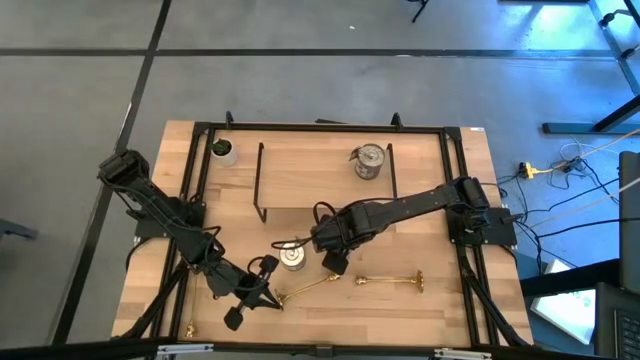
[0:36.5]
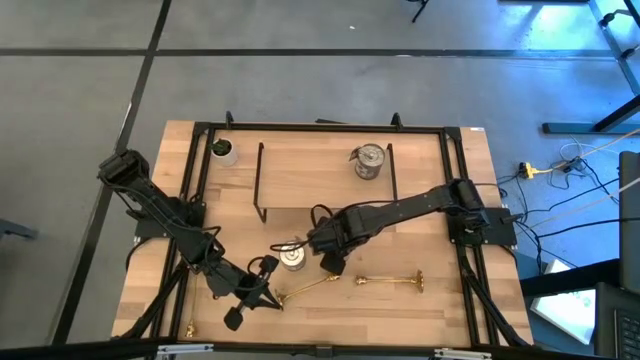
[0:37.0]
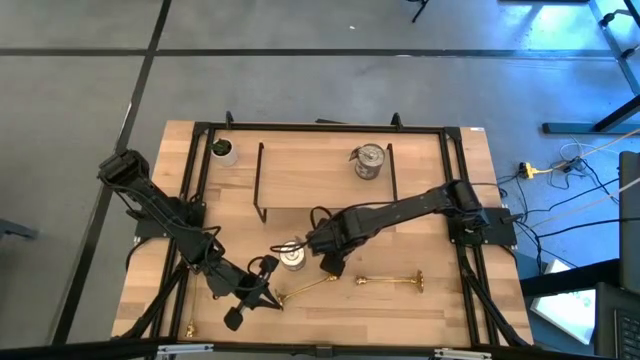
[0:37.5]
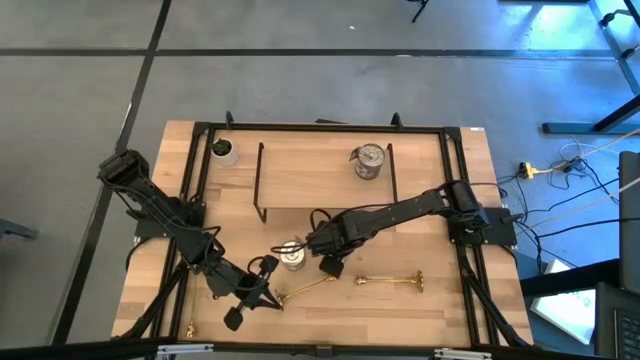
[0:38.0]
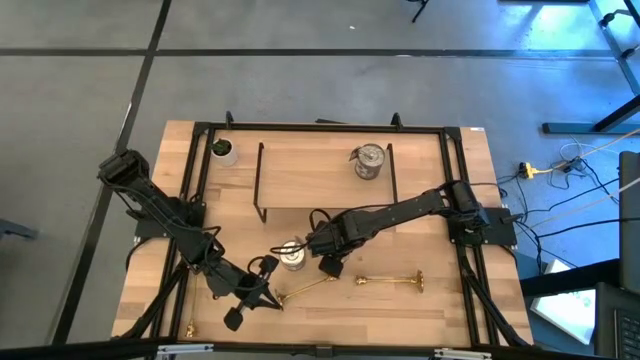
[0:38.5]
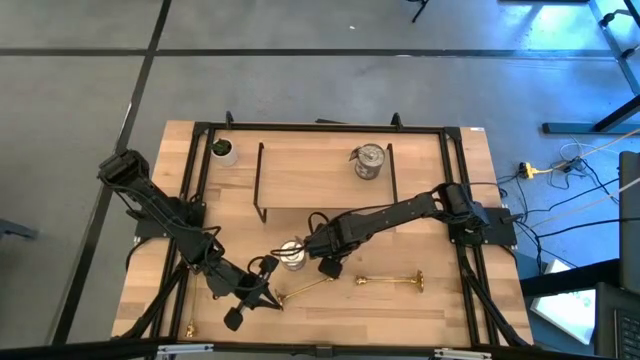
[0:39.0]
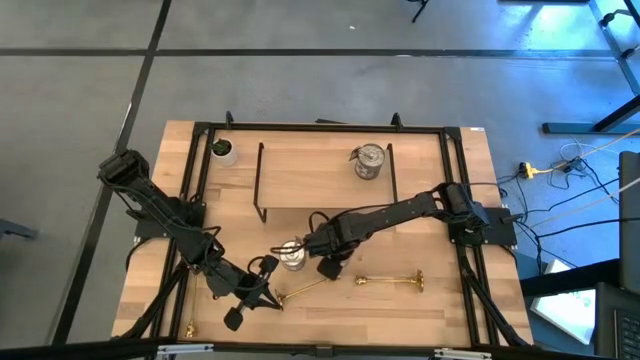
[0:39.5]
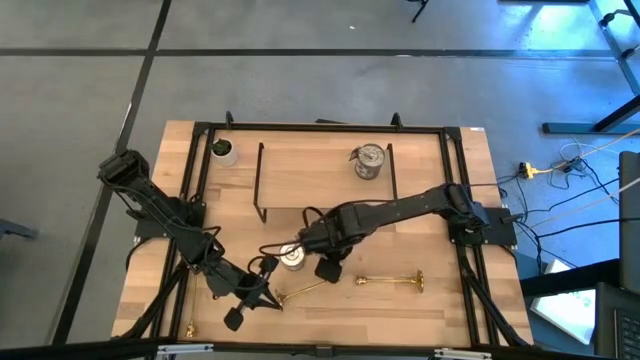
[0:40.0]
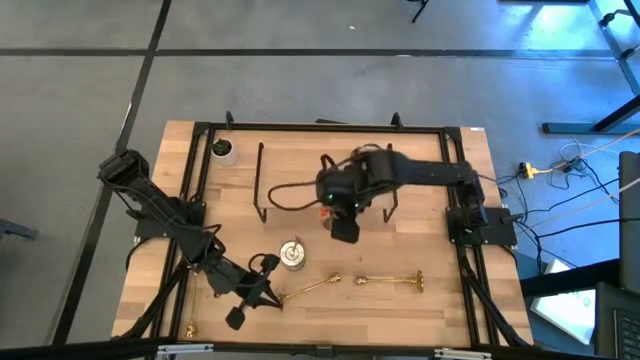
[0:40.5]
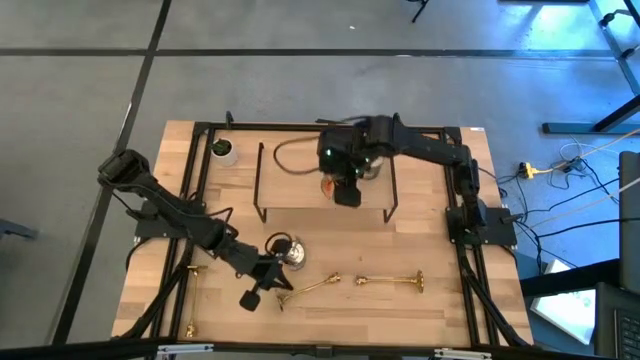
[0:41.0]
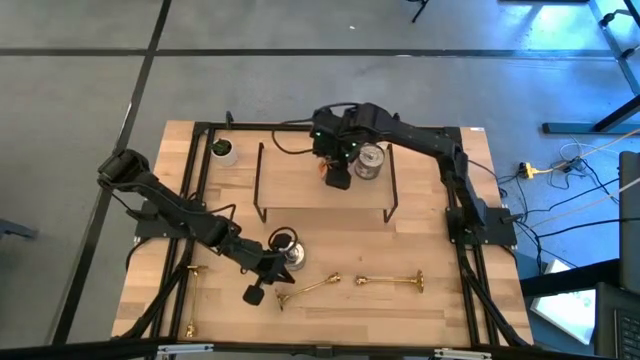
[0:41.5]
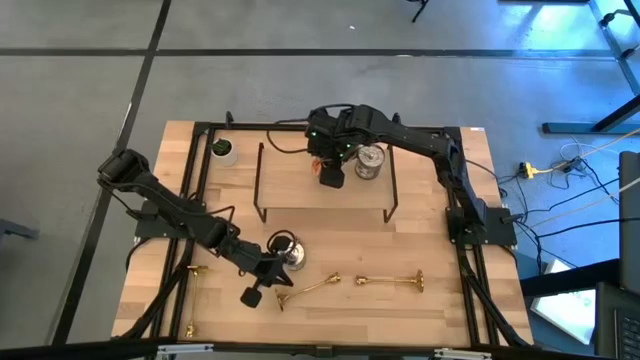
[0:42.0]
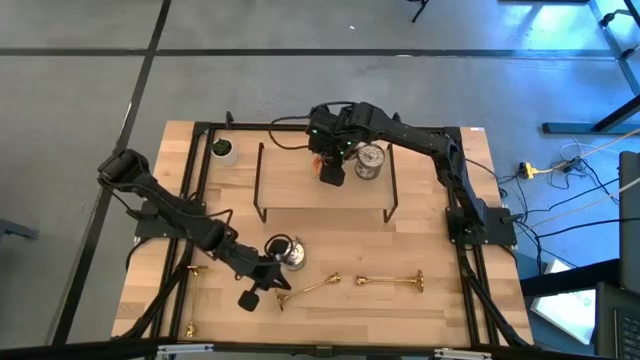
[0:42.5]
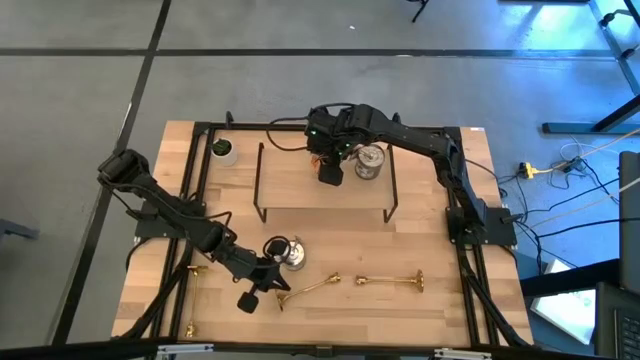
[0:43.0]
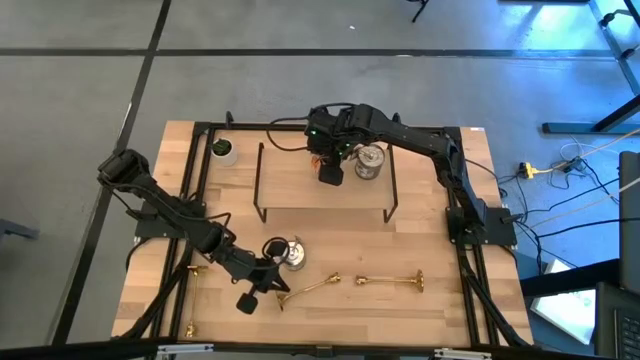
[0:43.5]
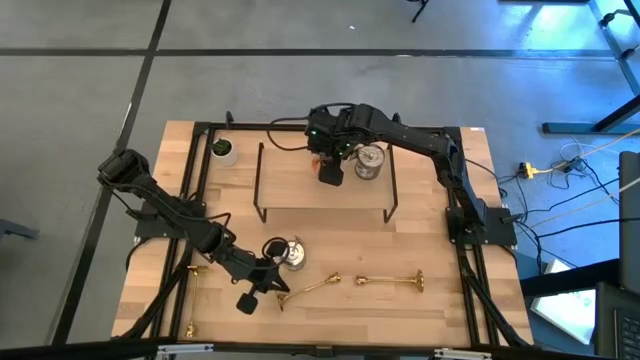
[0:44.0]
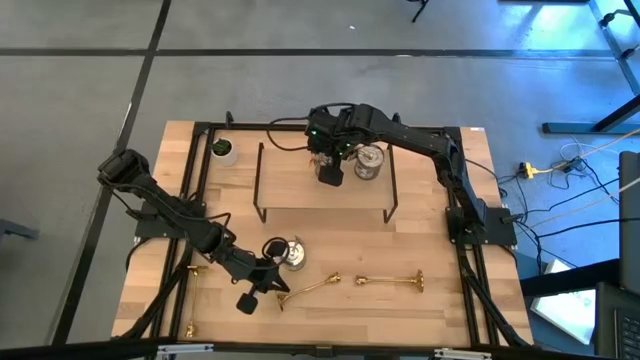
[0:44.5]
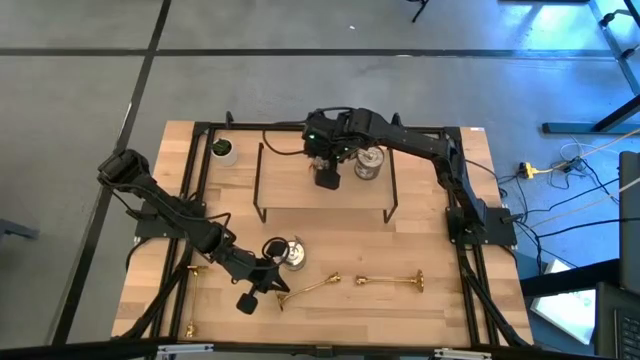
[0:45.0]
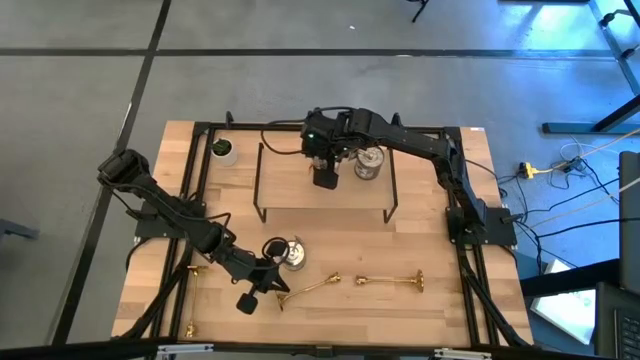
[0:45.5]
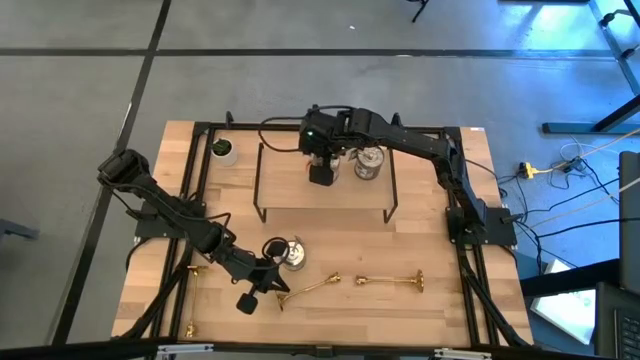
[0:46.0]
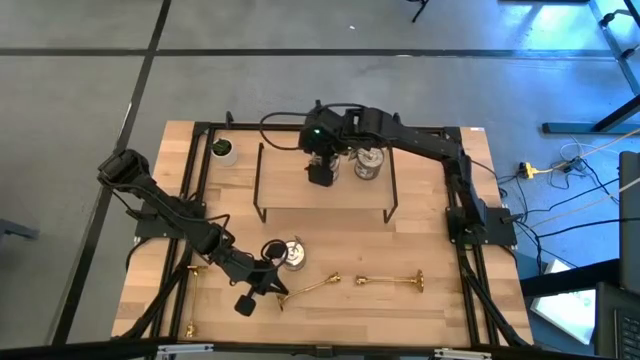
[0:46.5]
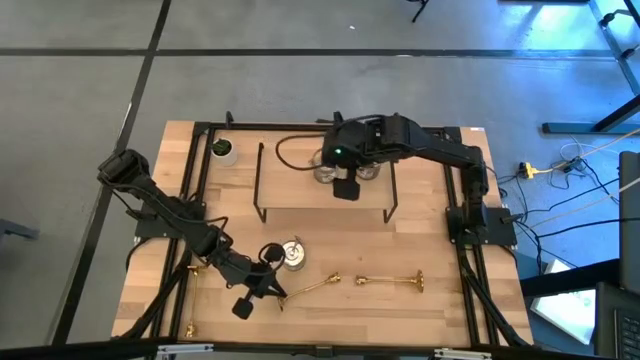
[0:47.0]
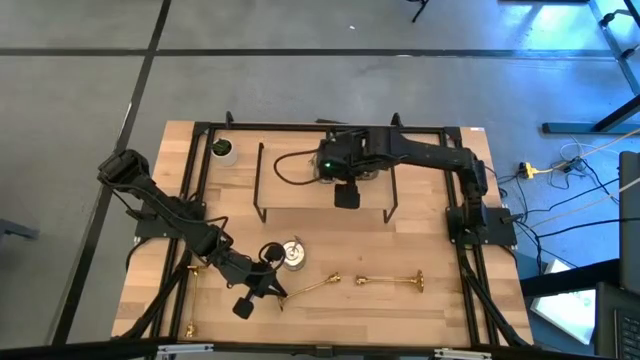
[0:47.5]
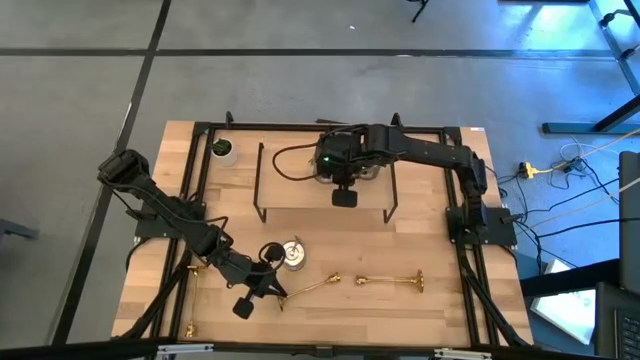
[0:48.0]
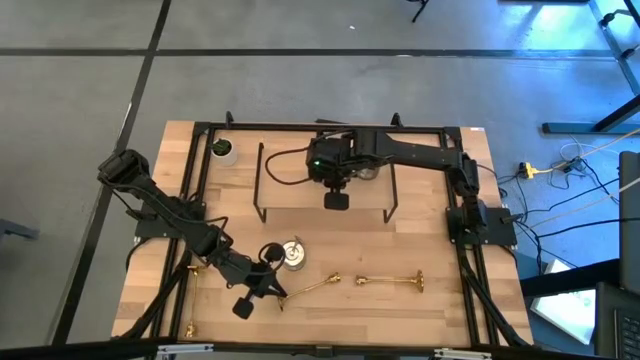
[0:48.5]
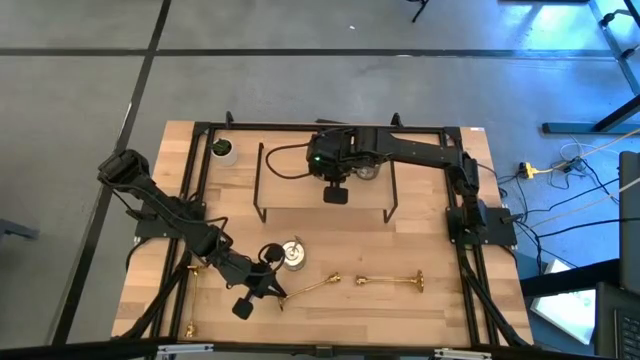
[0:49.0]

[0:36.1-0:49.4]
Task: Pick & Place candle stick holders
Put the right silver scented candle on the shelf

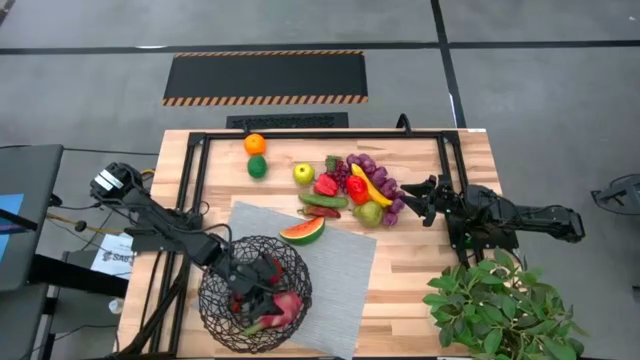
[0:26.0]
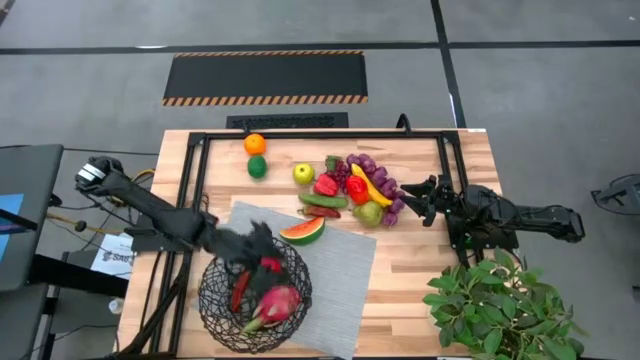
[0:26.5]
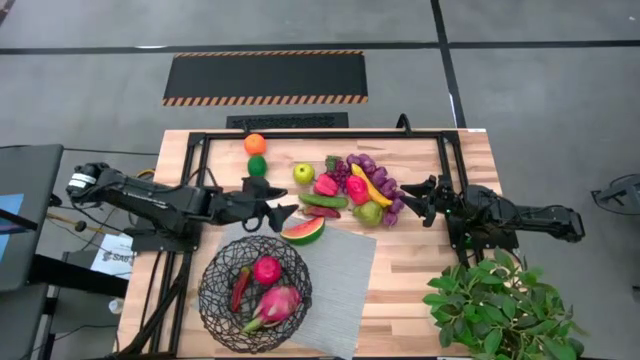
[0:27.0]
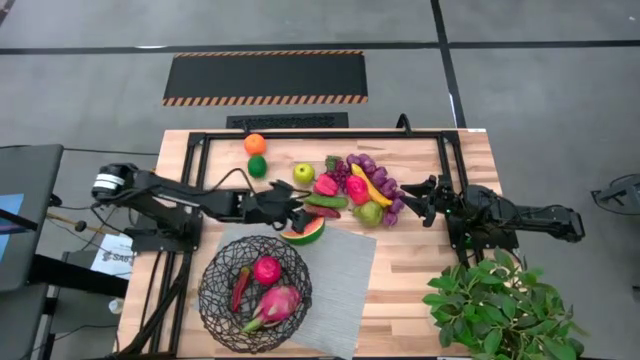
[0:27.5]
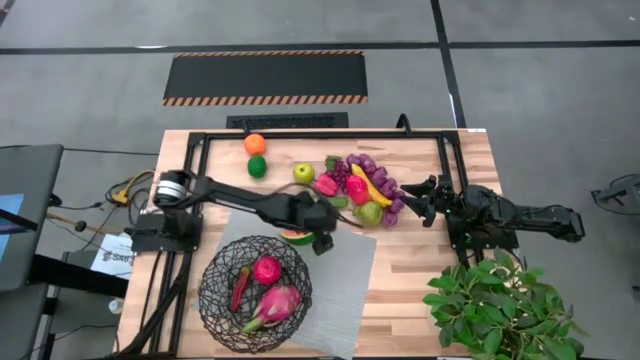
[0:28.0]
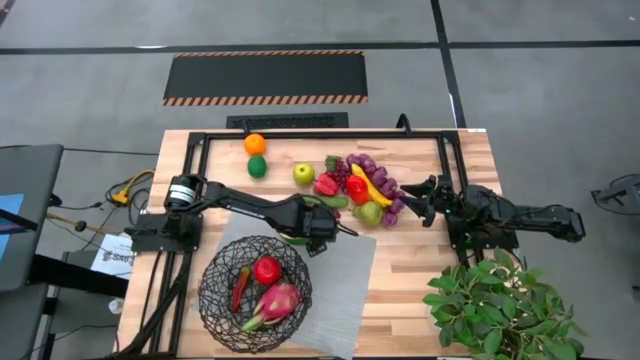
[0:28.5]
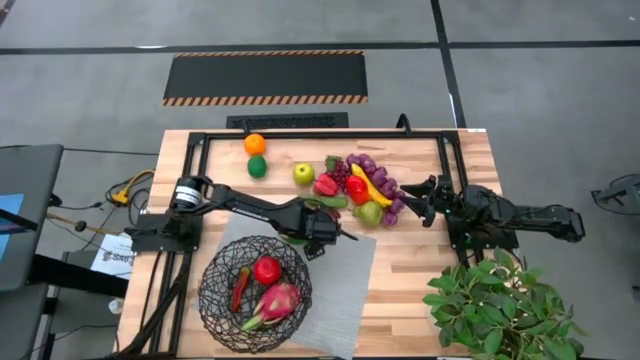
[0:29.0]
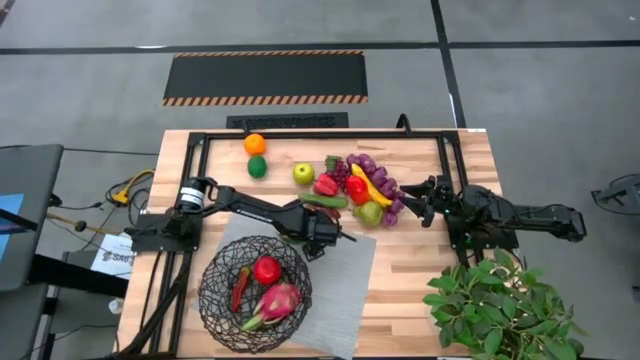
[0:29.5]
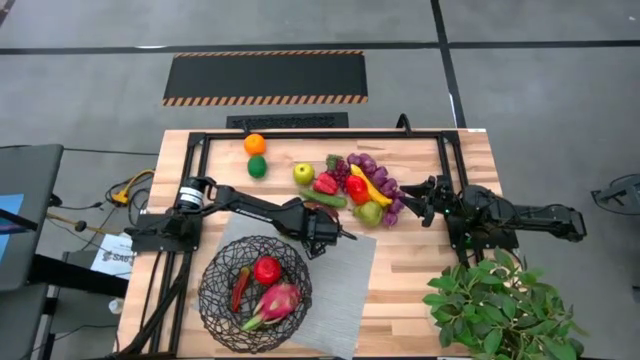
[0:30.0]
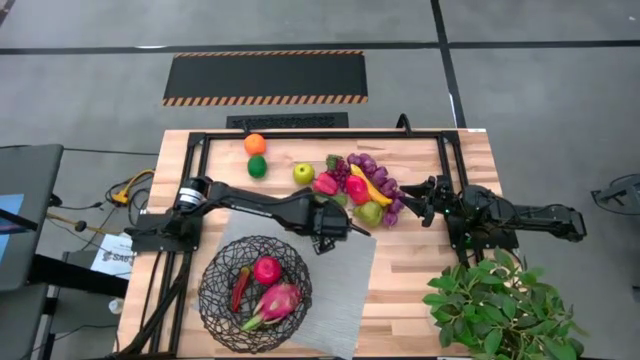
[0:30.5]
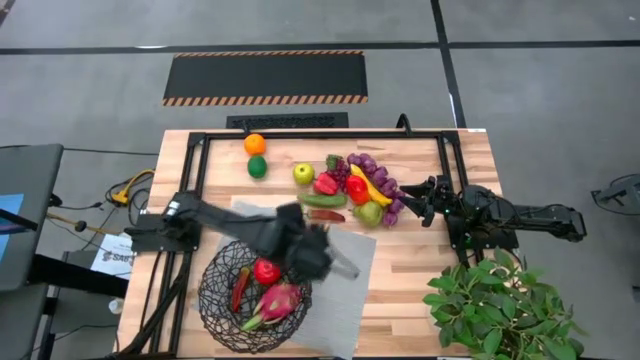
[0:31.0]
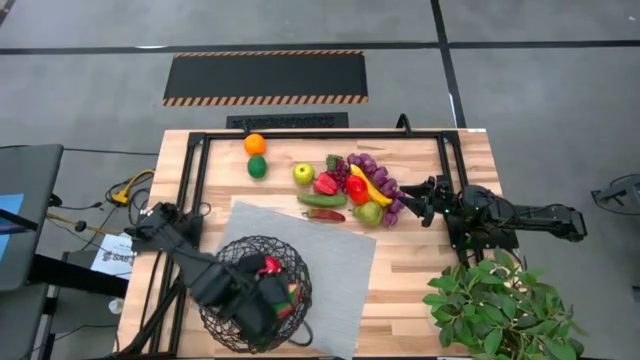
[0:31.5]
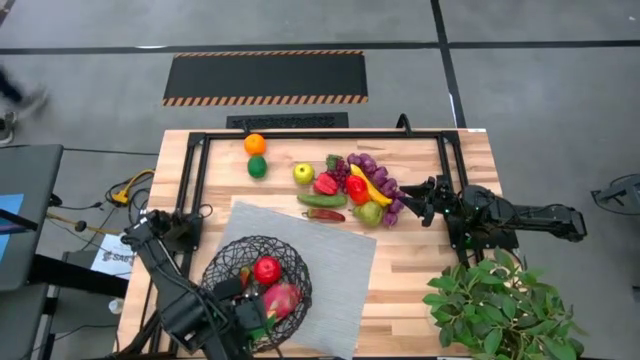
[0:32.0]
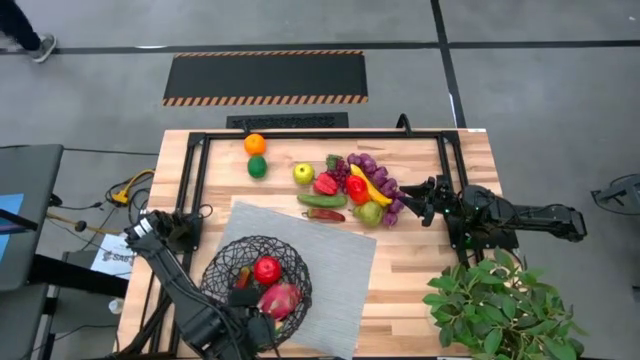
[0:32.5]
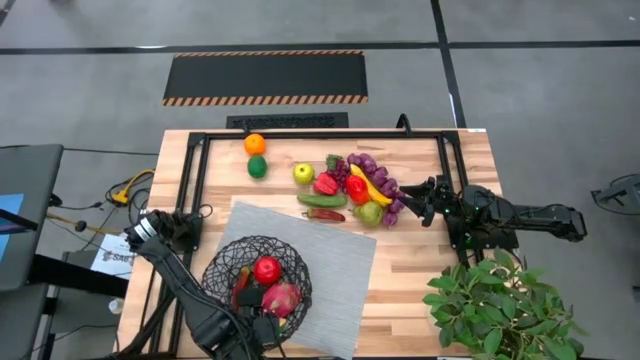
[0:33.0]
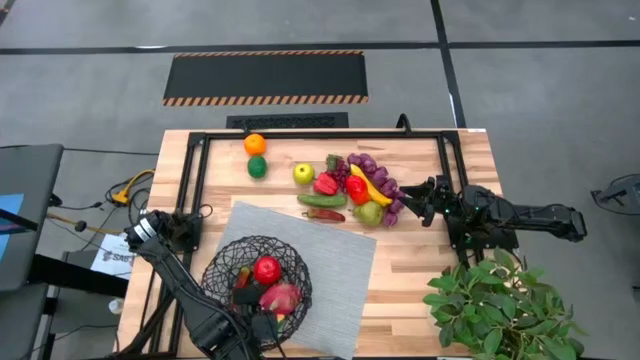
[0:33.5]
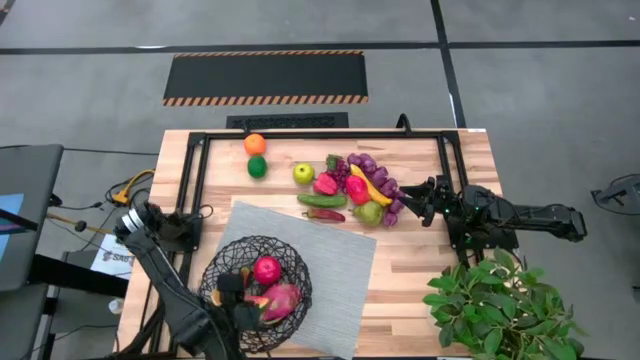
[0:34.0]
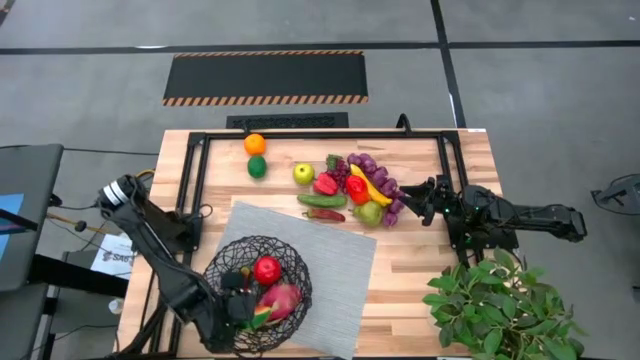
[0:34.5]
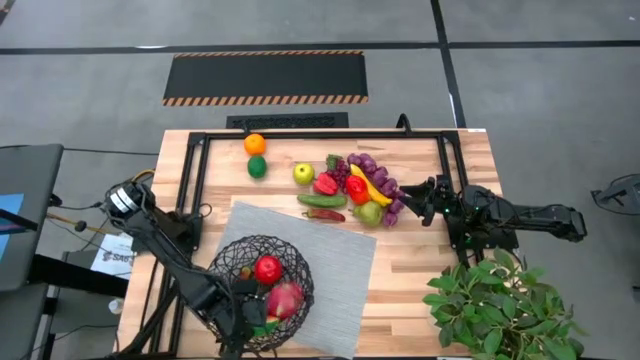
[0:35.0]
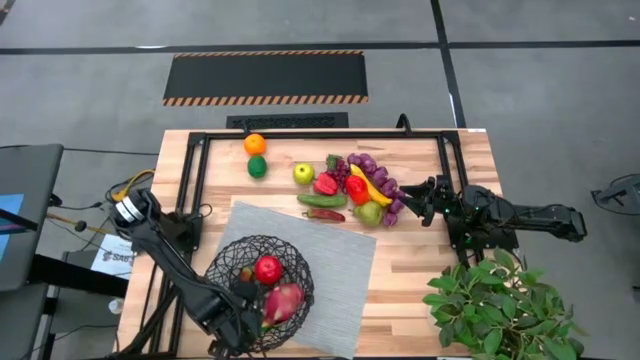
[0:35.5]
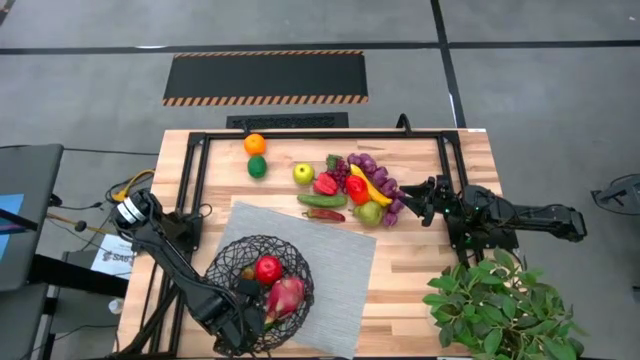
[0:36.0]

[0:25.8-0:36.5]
Task: Build produce basket
Put the red watermelon into the mesh basket
